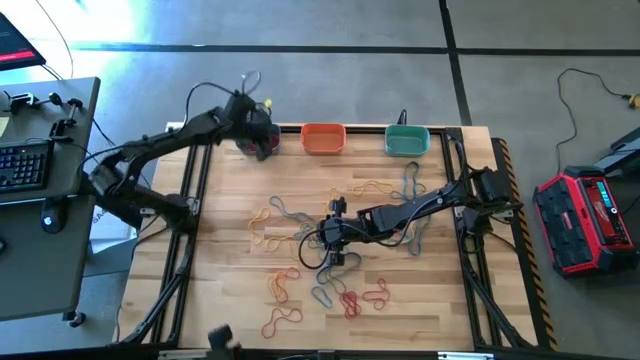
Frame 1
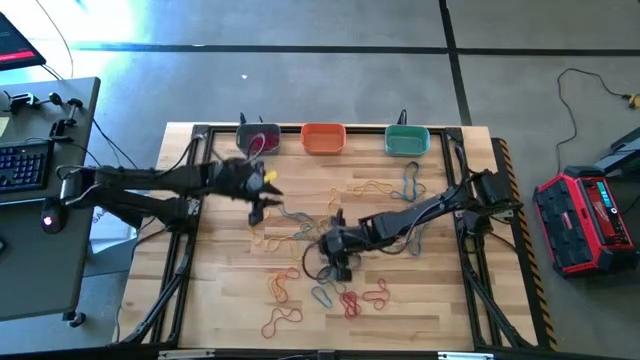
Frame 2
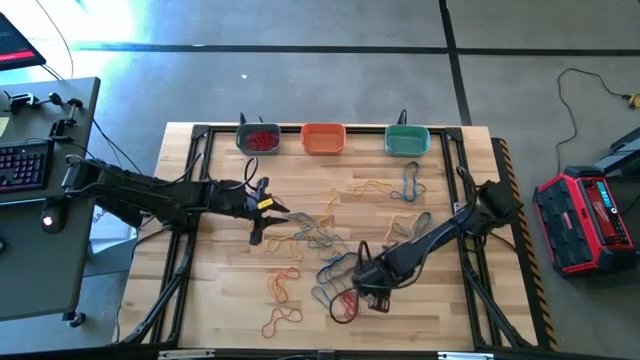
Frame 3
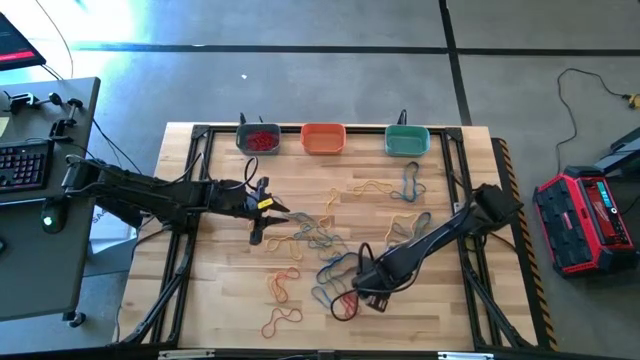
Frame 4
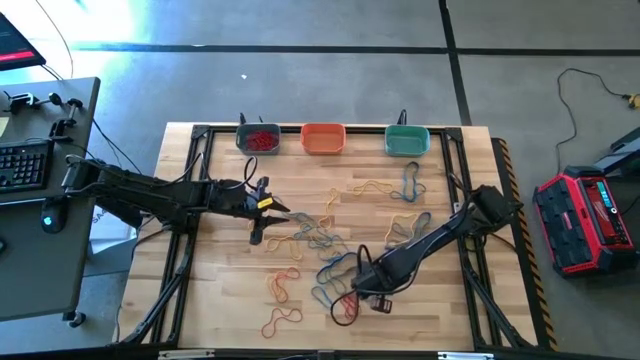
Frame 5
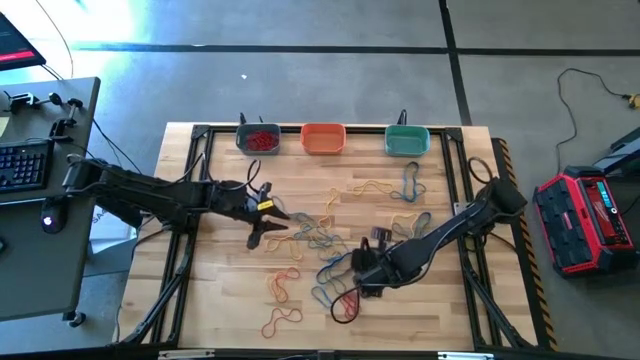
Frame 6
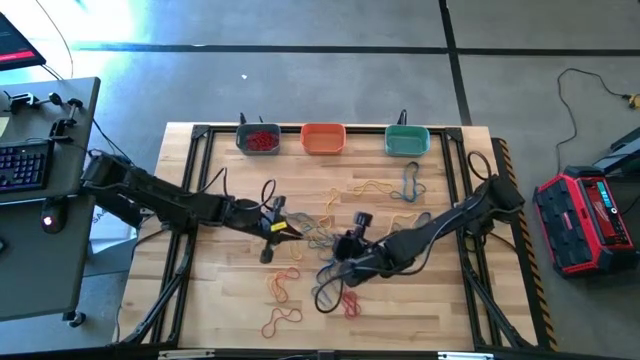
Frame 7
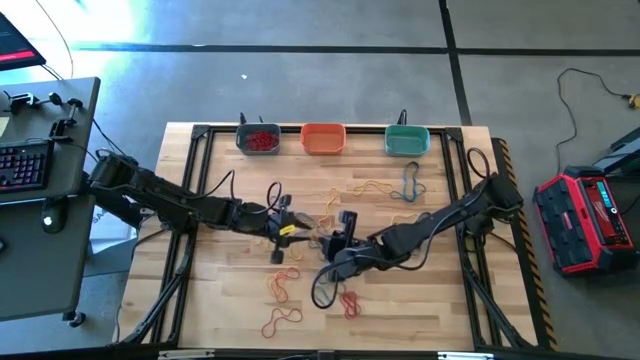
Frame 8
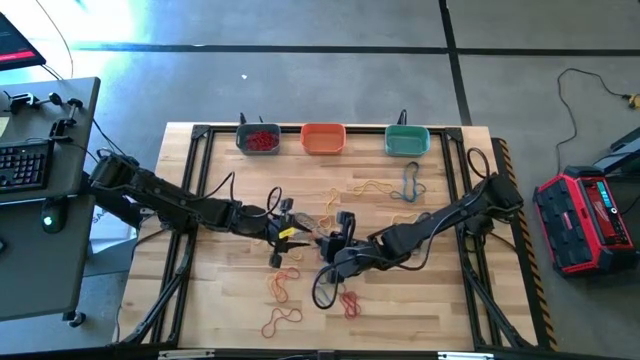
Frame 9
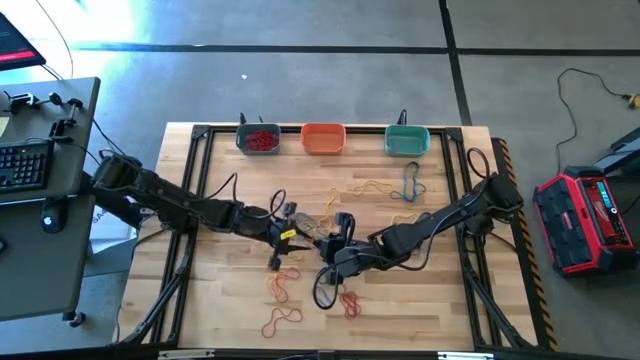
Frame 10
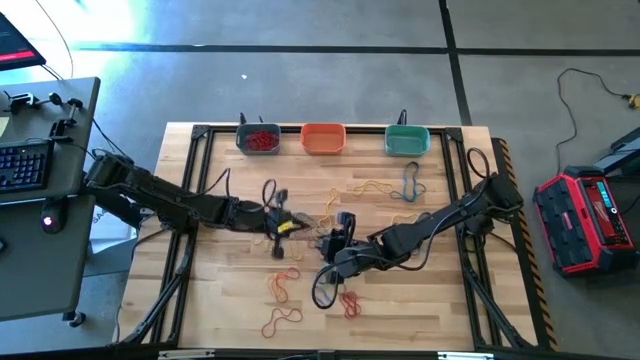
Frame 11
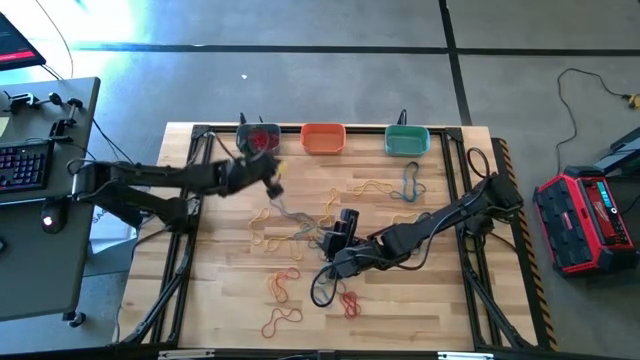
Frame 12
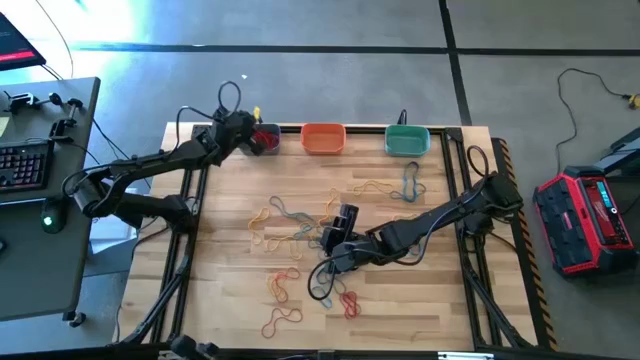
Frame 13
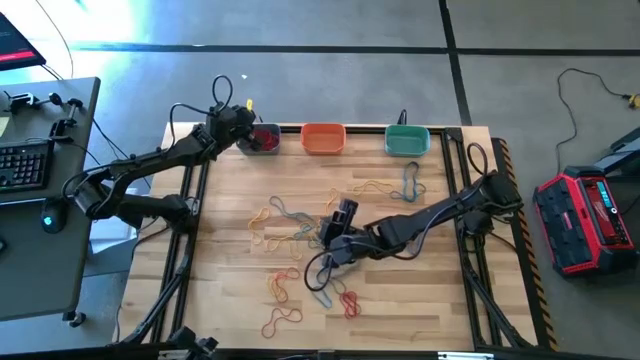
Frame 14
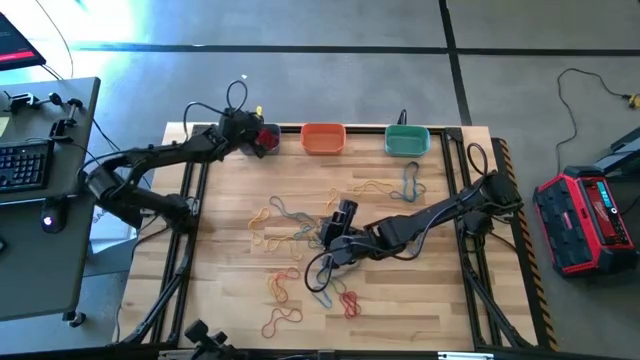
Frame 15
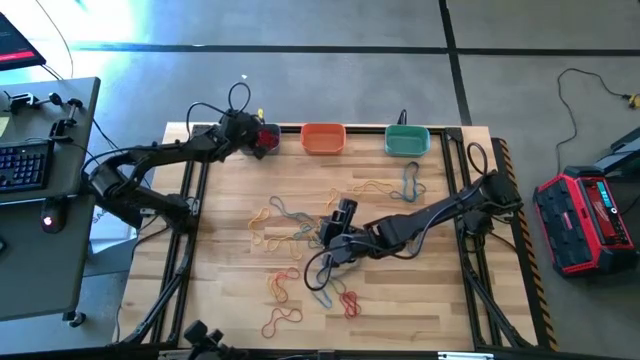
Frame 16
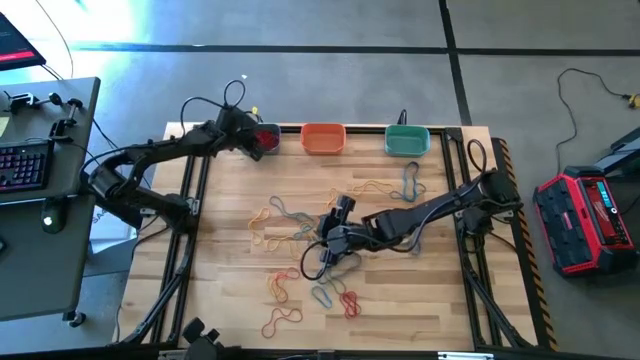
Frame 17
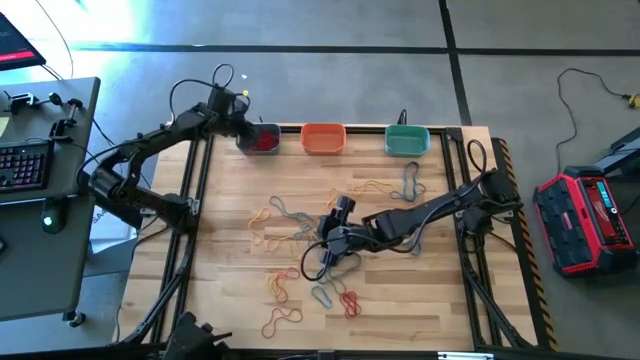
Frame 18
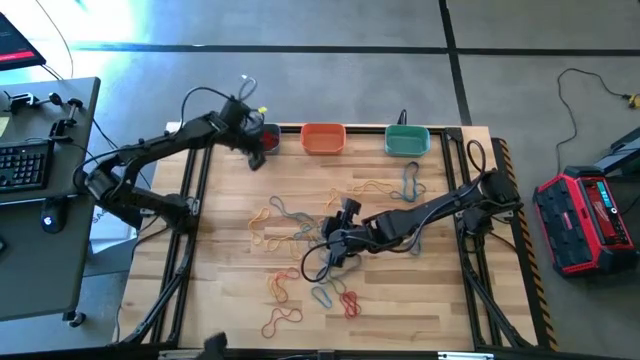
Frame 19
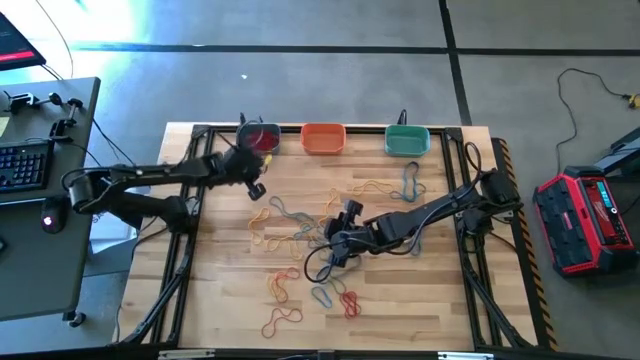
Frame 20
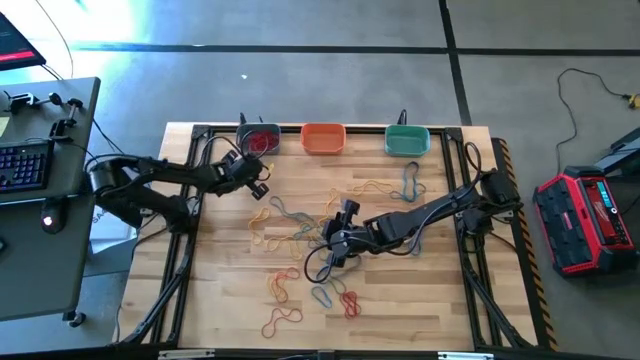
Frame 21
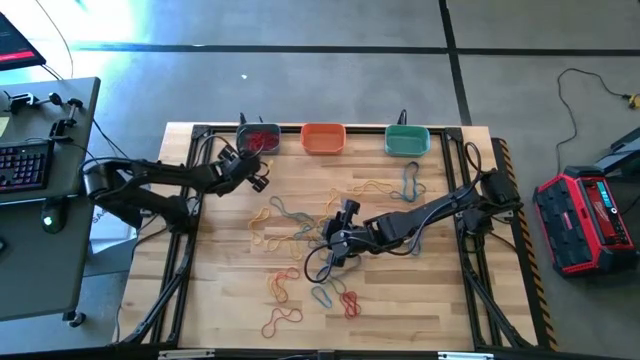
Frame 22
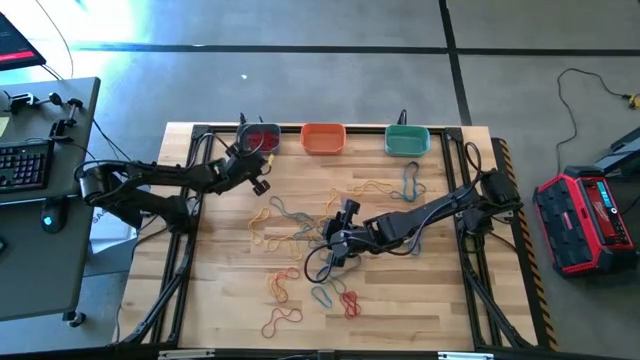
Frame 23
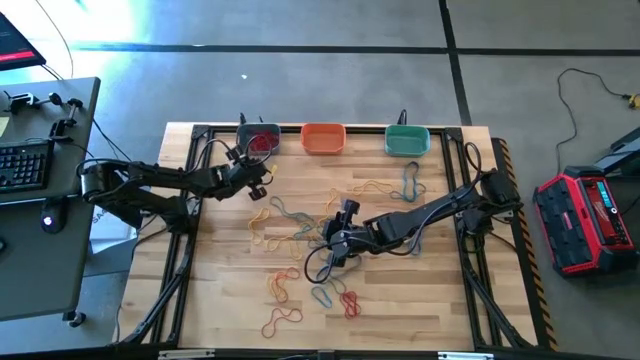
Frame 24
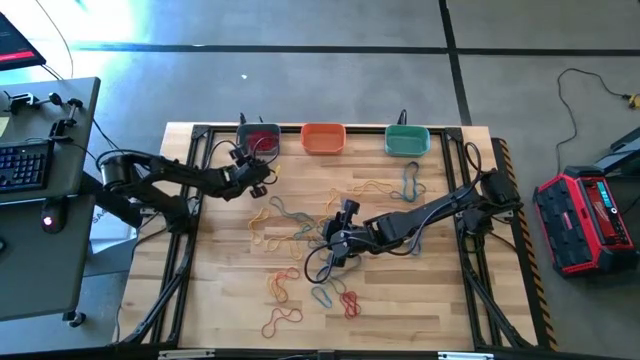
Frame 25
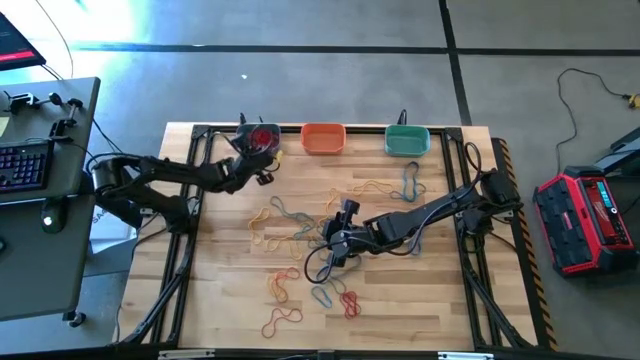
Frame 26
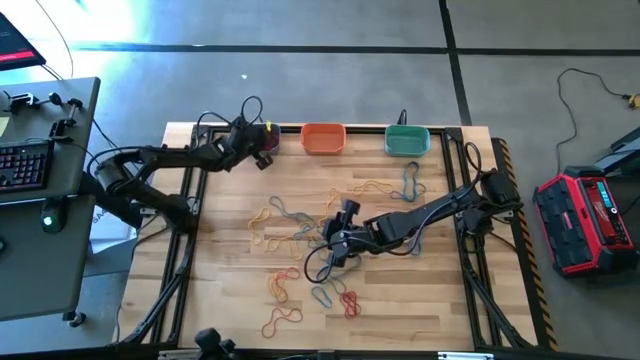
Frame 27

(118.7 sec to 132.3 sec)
Task: Sort rubber bands into baskets
Put the red rubber band into the blue bin

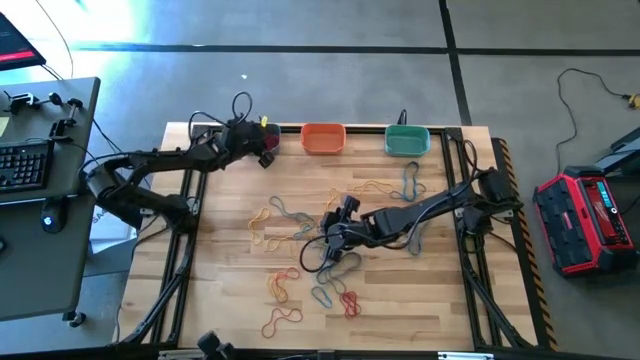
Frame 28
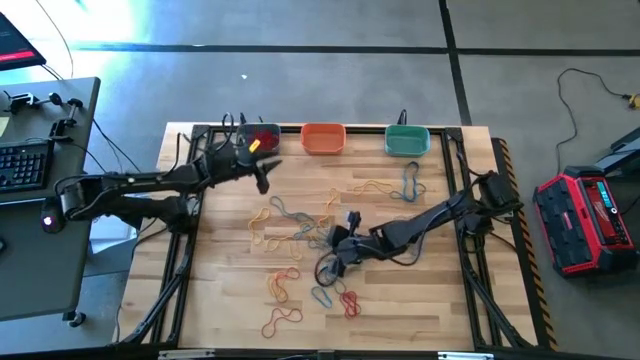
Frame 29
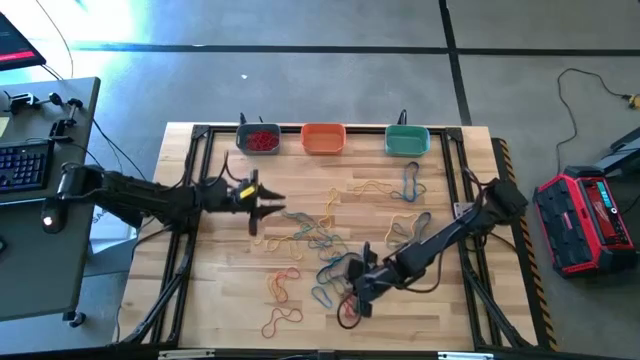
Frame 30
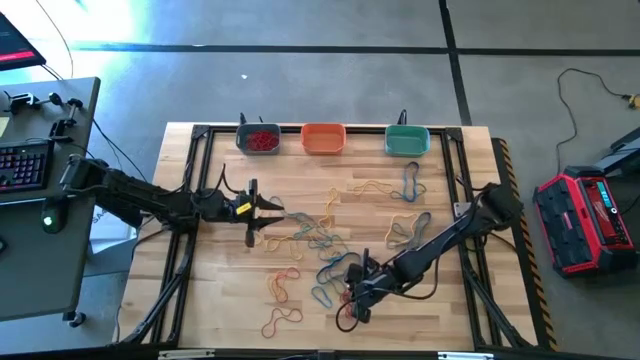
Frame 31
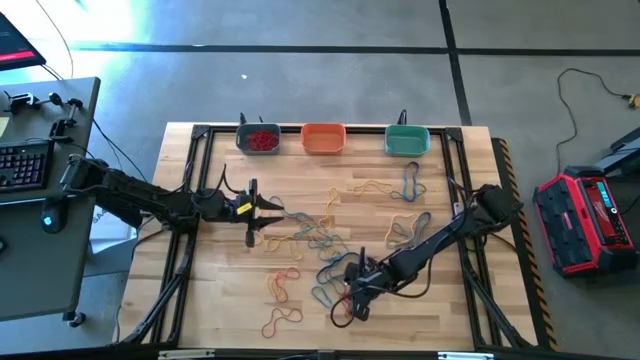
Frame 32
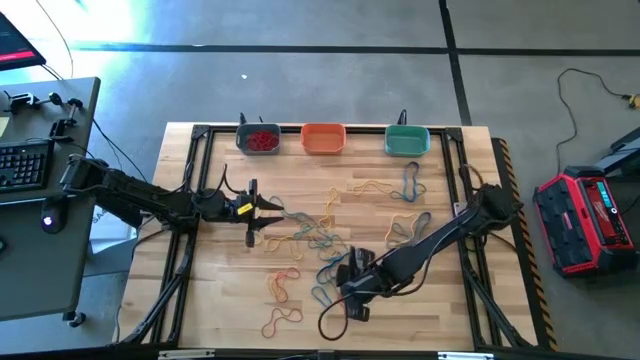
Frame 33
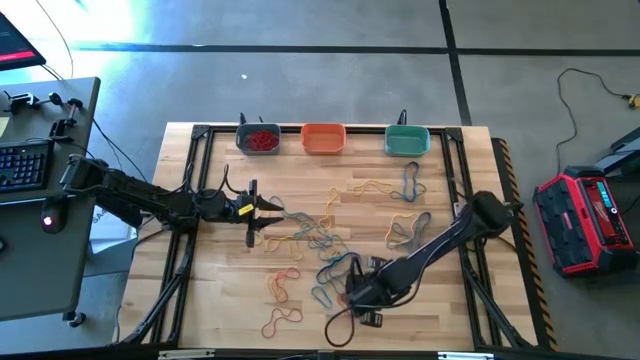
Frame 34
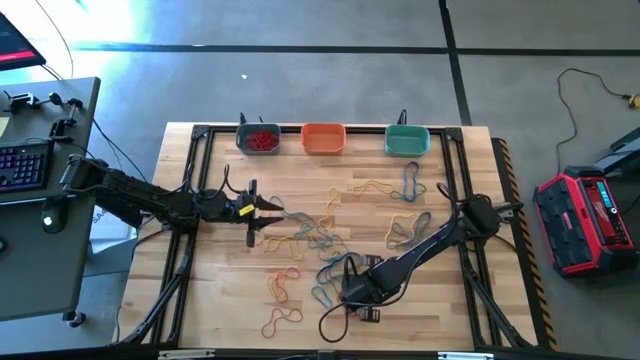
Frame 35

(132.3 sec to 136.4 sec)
Put the red rubber band into the blue bin

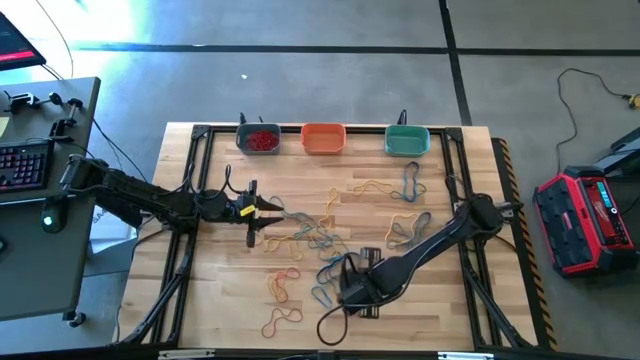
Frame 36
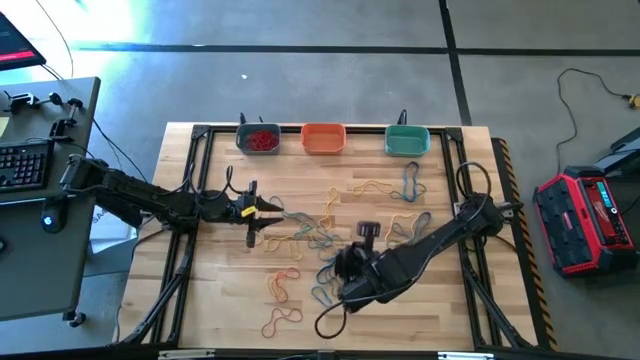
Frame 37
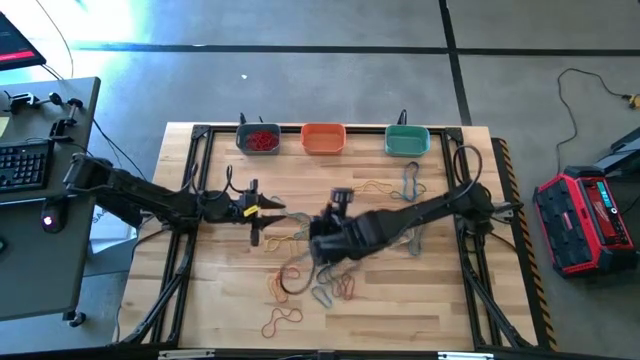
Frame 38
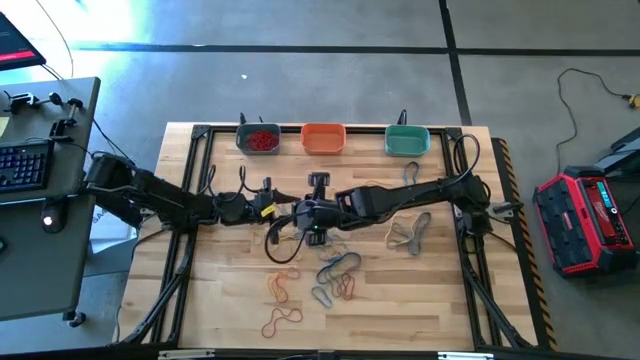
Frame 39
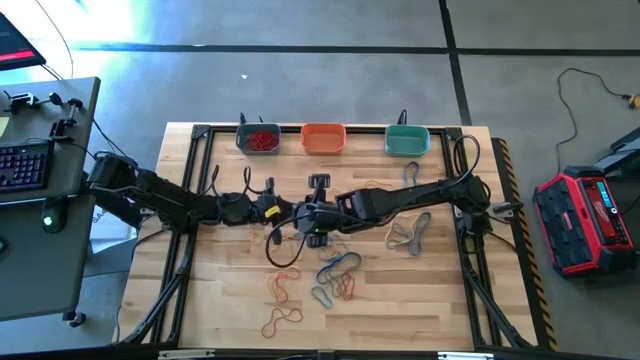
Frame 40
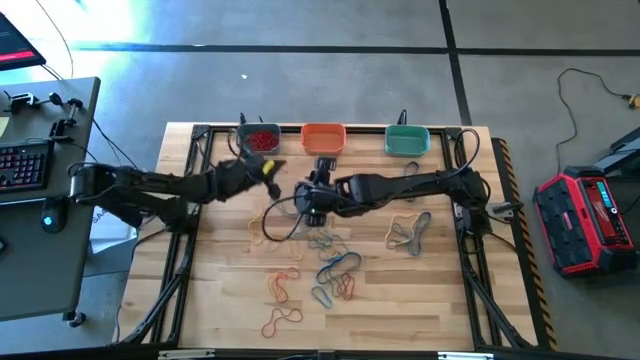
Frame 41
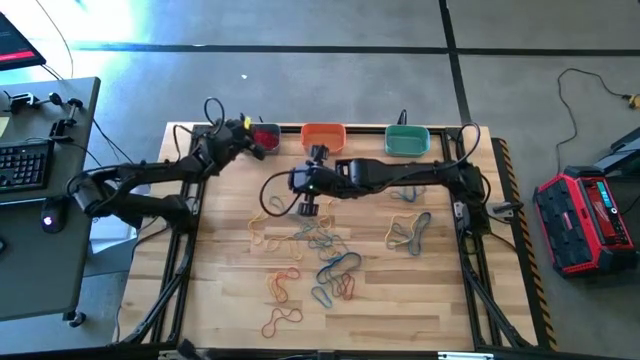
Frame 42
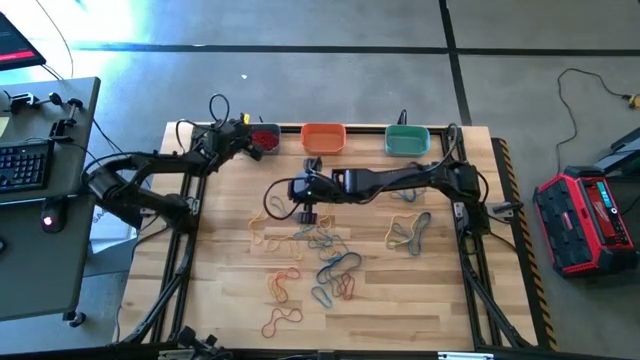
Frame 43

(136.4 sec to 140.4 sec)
Put the red rubber band into the blue bin
